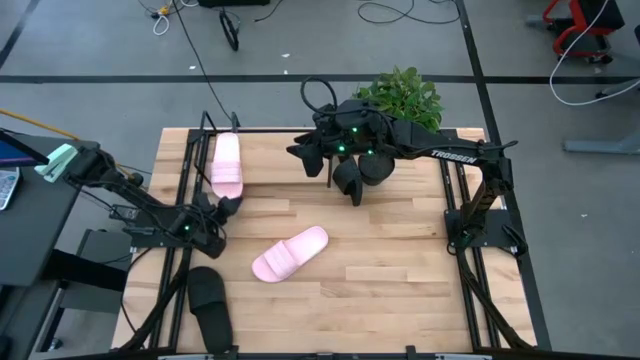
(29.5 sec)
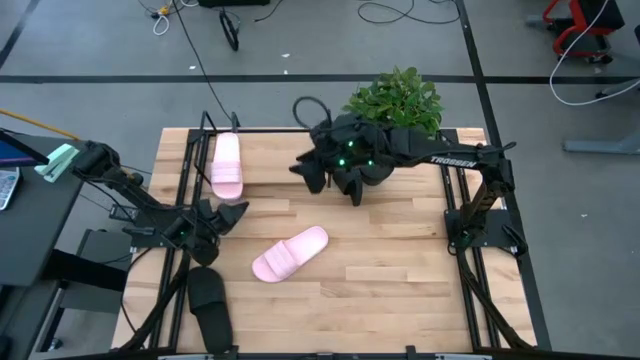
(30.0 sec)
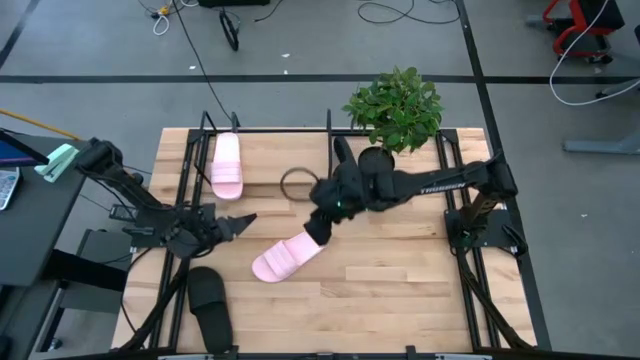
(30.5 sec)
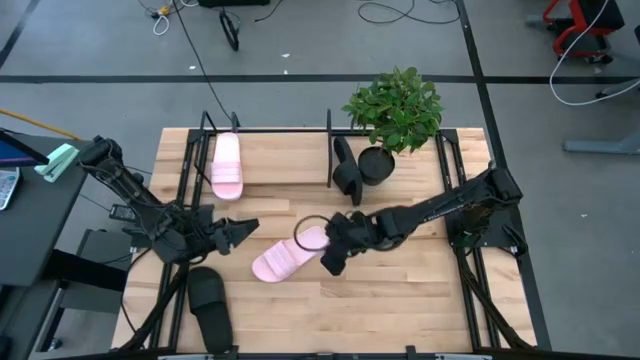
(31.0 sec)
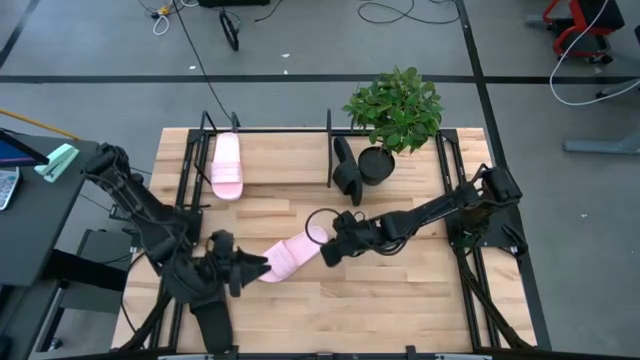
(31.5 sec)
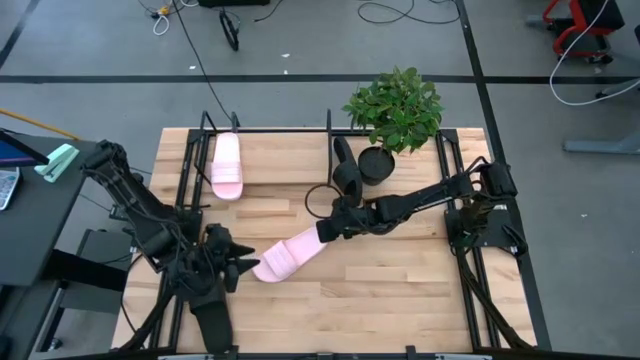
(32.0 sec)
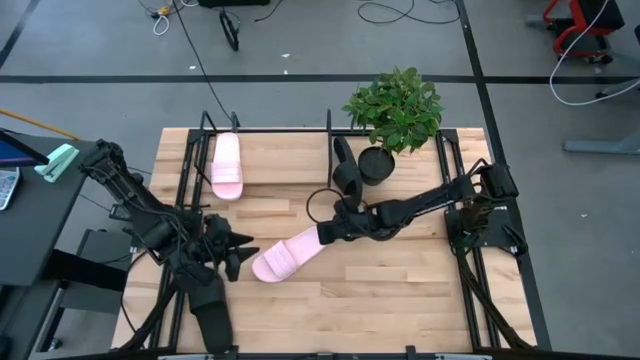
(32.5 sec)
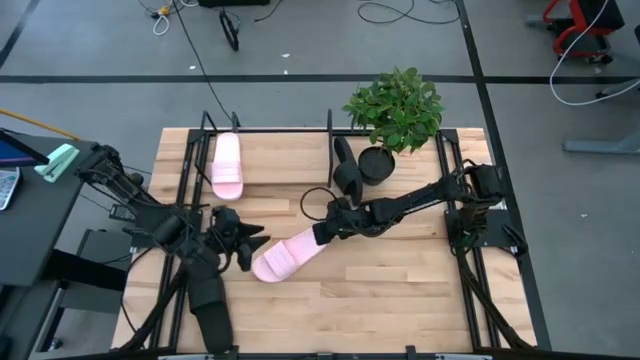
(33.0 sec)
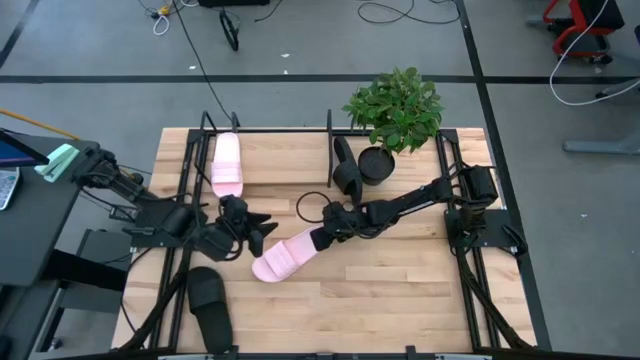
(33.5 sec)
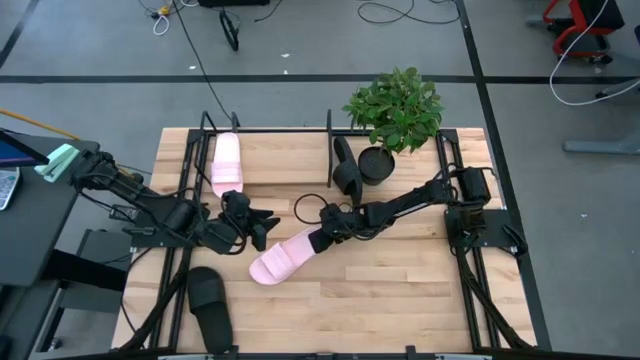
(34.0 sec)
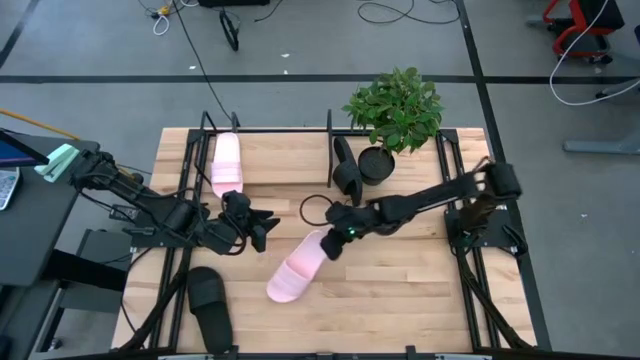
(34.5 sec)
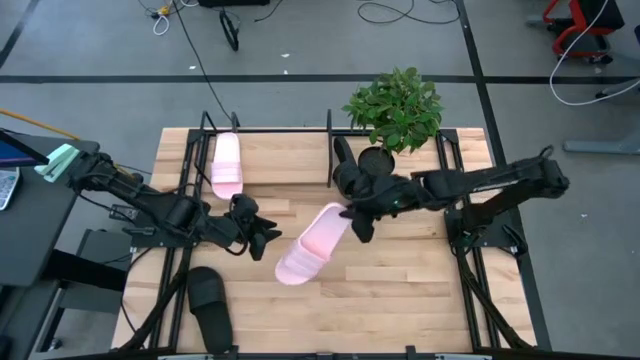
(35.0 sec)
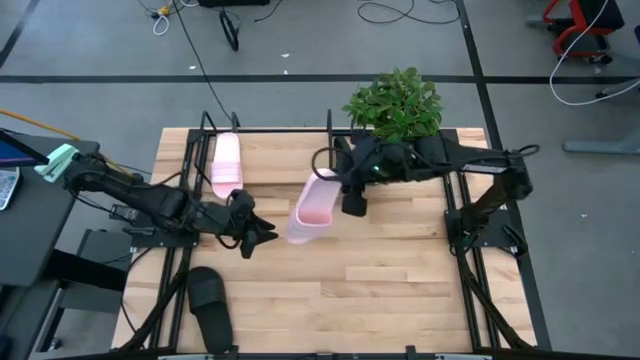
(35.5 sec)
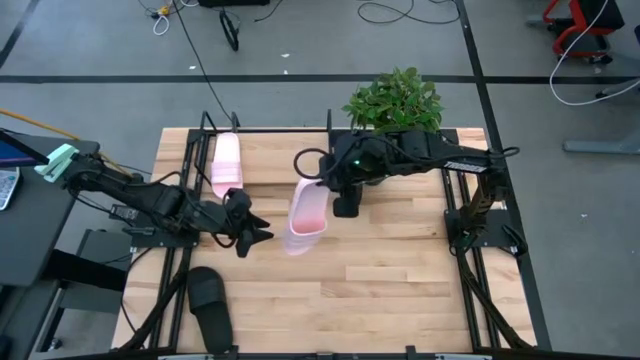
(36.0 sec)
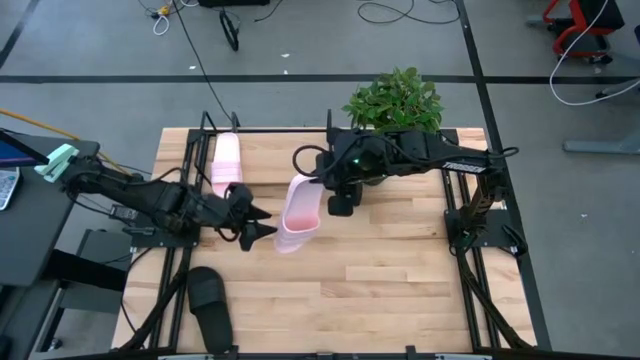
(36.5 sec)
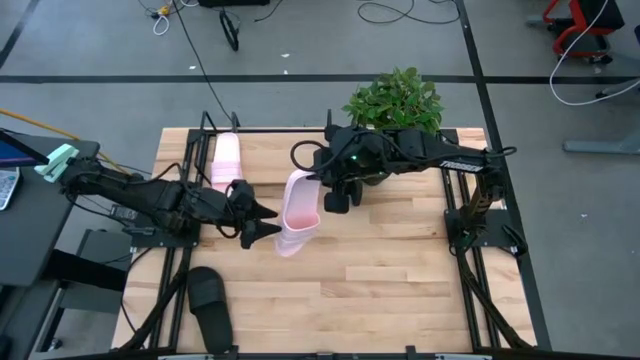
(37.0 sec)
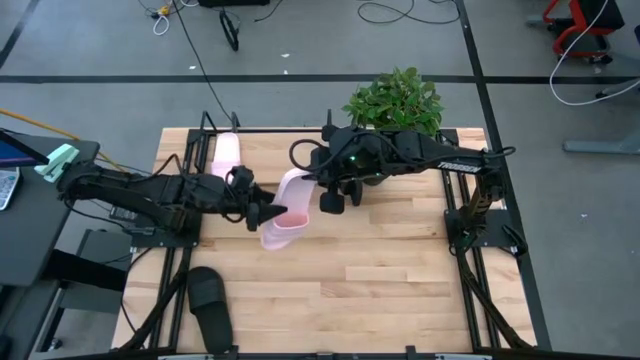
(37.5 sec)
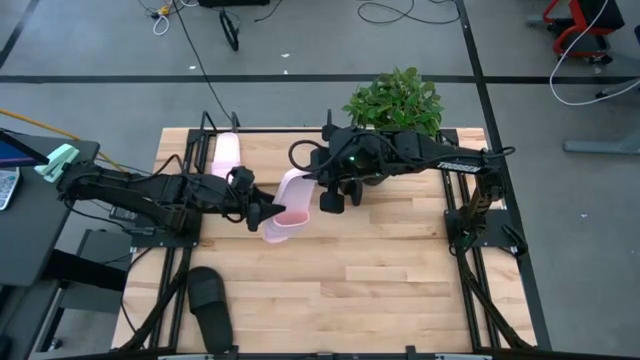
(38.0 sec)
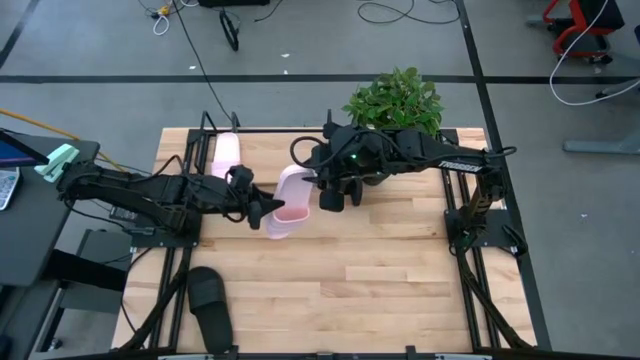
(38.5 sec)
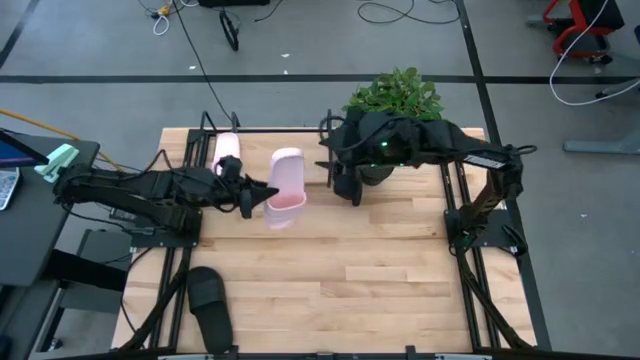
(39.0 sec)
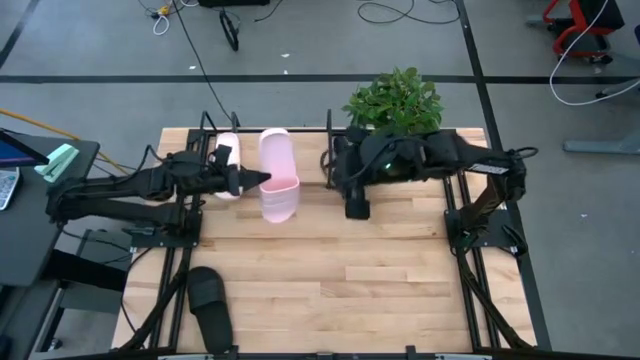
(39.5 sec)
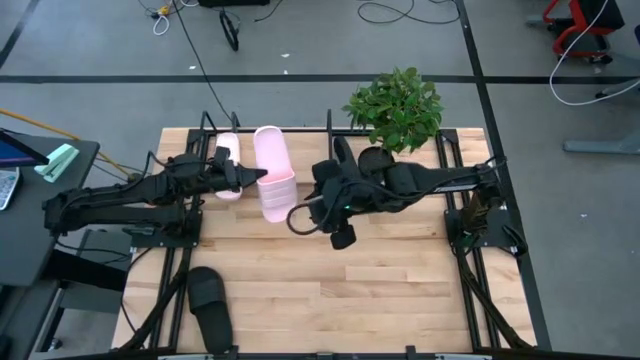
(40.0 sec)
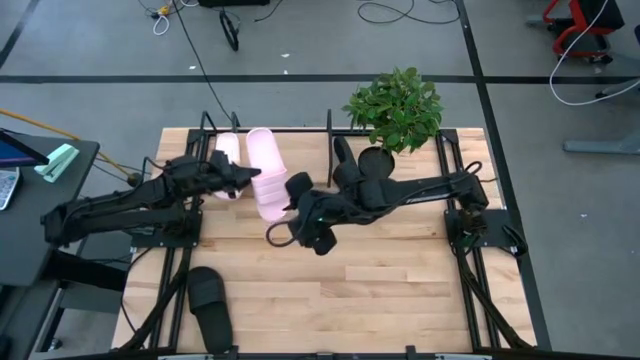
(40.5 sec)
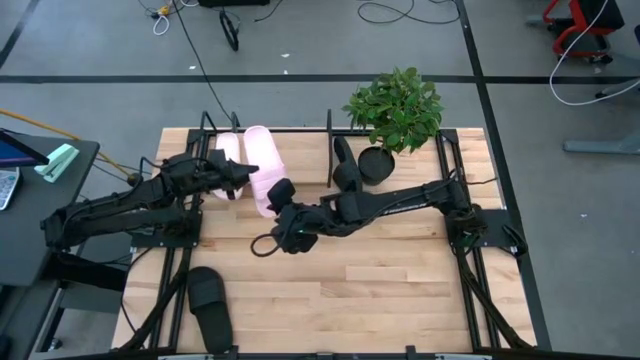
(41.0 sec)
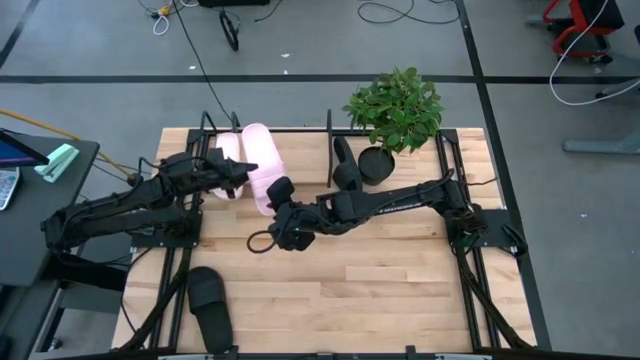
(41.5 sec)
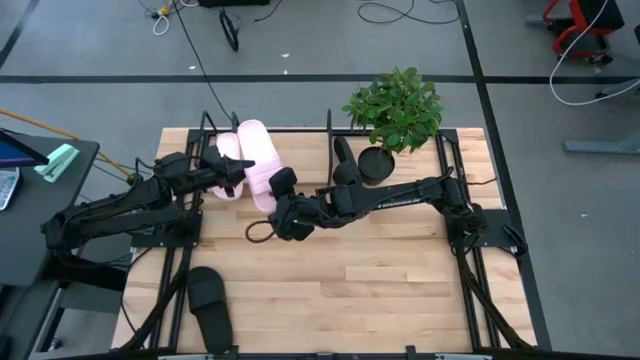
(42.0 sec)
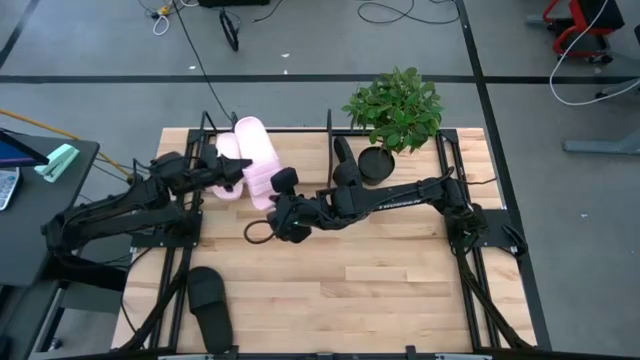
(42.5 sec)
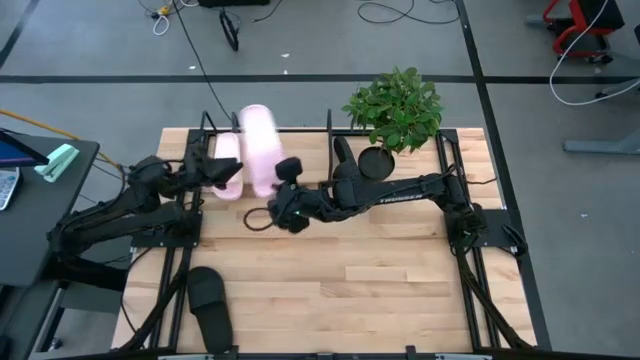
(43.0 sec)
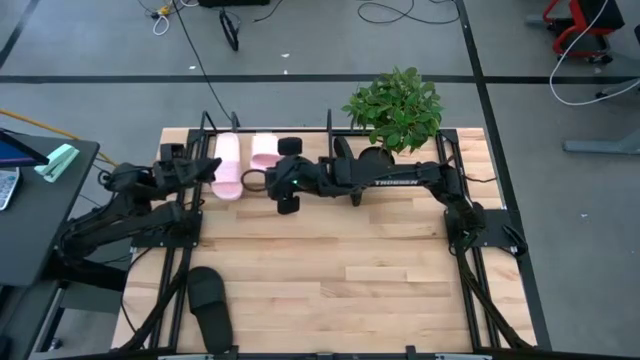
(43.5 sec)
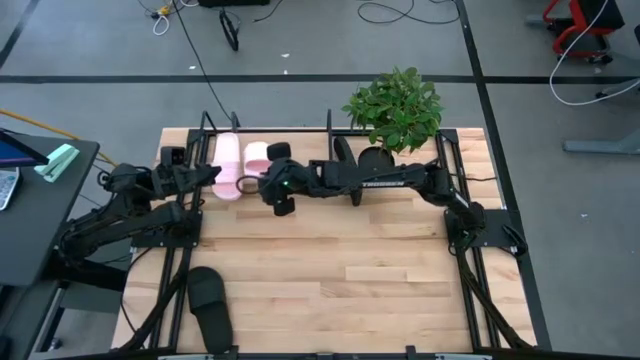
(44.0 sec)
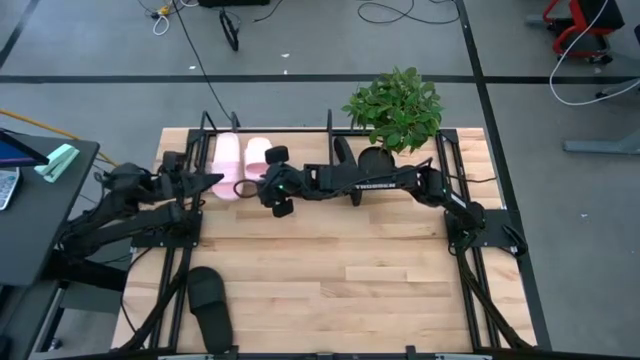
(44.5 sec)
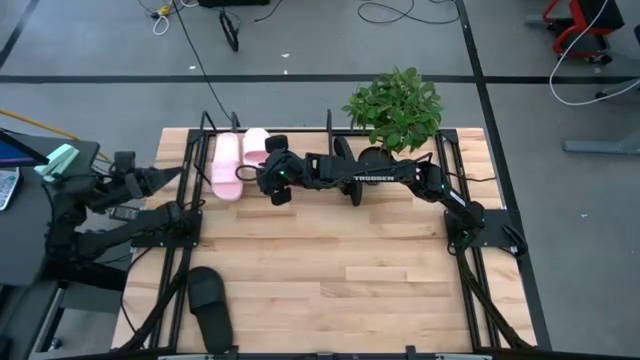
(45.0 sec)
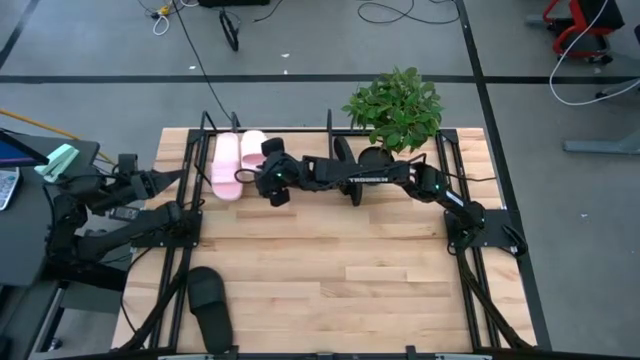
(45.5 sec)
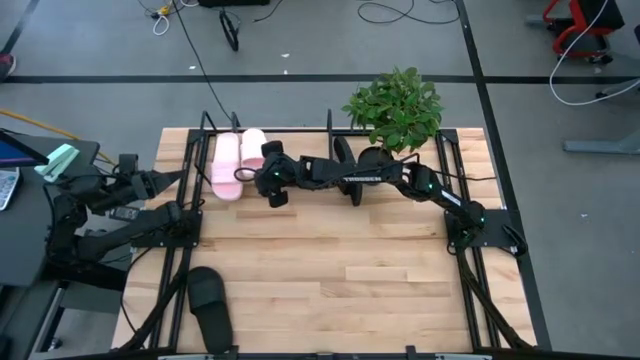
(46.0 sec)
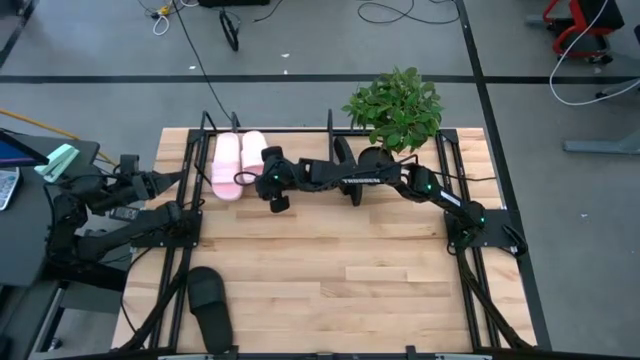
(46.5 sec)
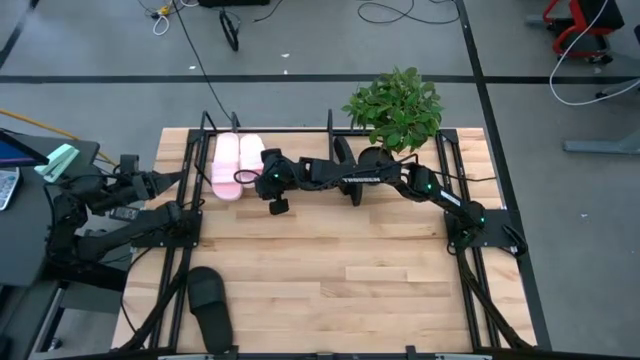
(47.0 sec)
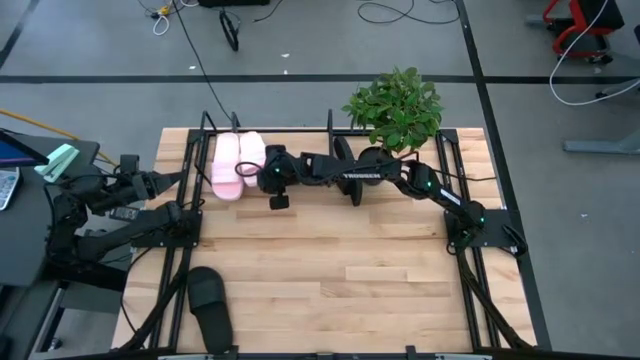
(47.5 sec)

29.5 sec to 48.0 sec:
Task: Pick and place slides into the shelf
Put the pink slide on the shelf

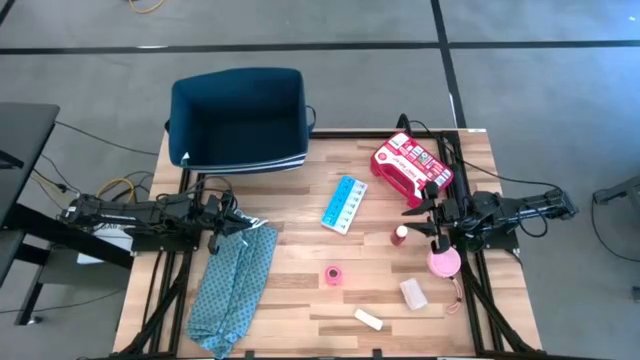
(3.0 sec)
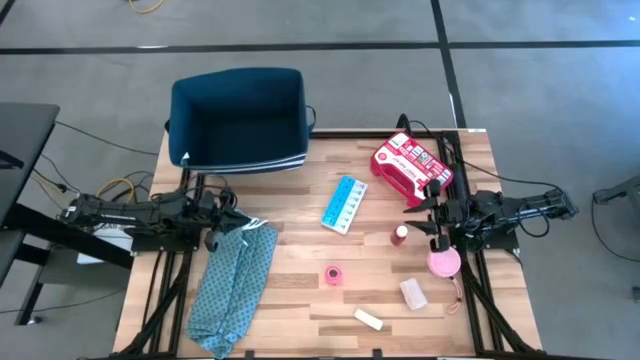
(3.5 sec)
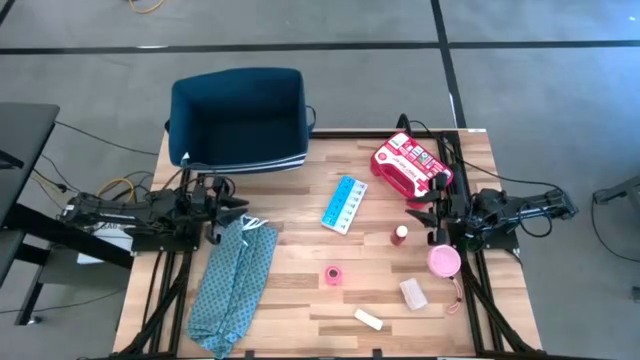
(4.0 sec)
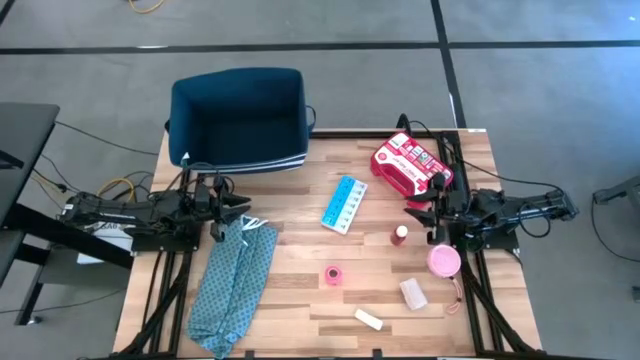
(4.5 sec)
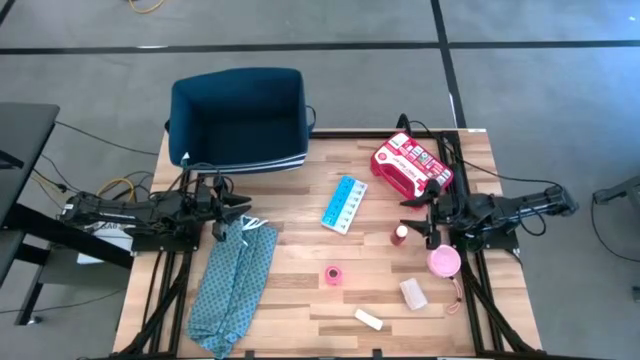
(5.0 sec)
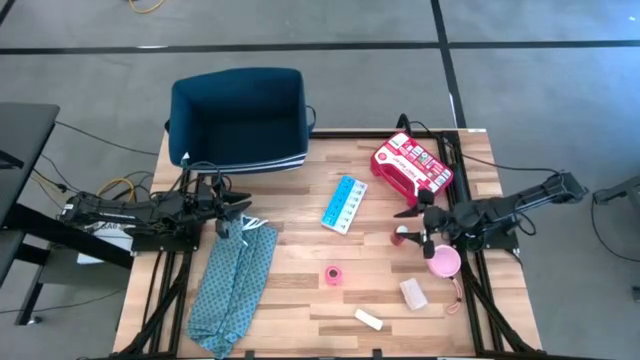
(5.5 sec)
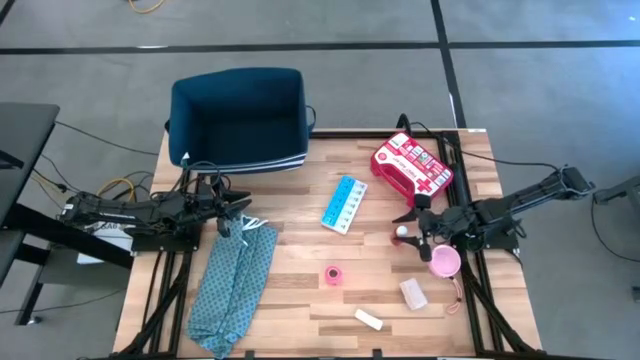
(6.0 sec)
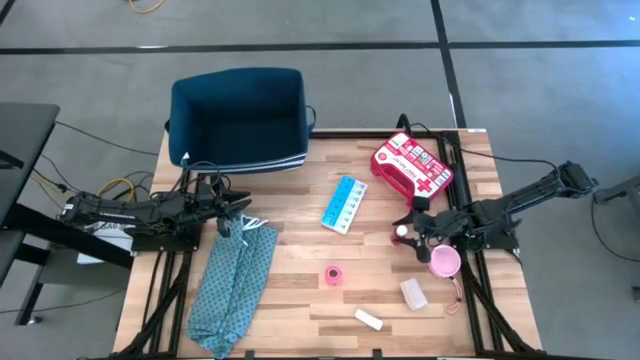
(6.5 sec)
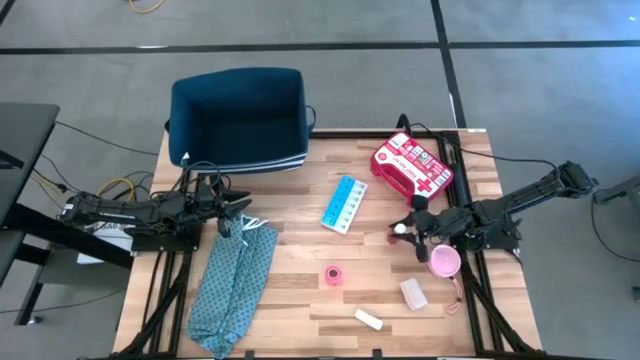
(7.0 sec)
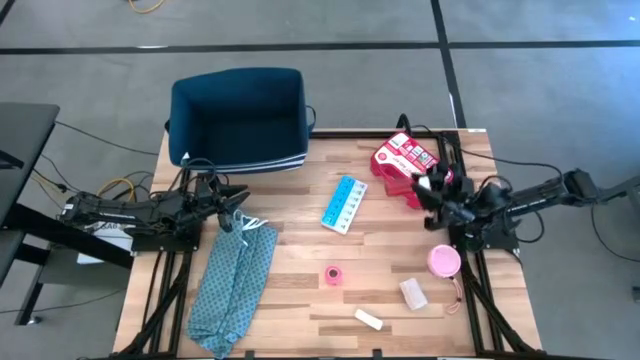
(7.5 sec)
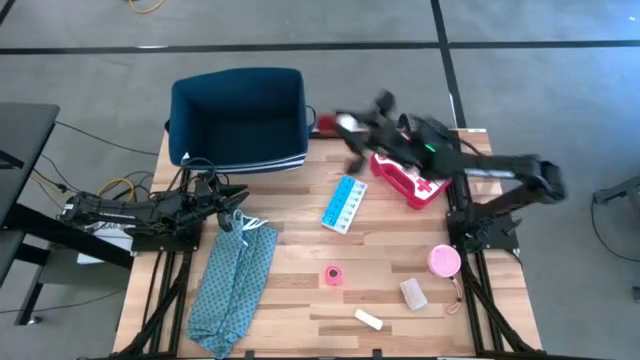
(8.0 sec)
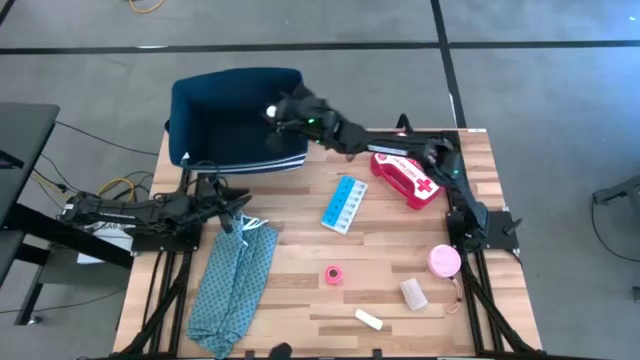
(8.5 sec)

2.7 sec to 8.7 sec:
Task: Pick & place medical supplies in basket/bin
Put the orange pill bottle into the blue bin
